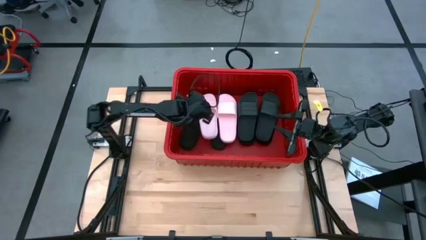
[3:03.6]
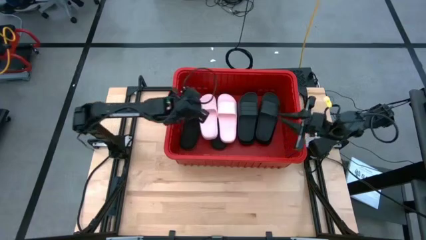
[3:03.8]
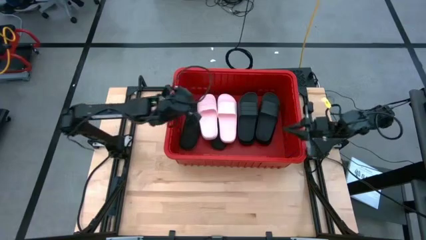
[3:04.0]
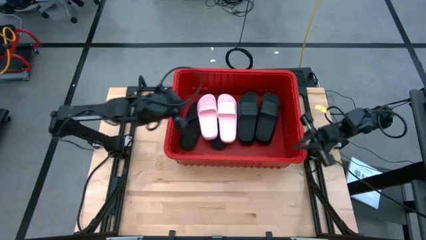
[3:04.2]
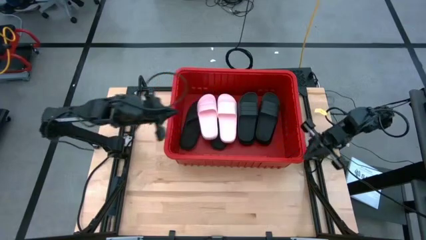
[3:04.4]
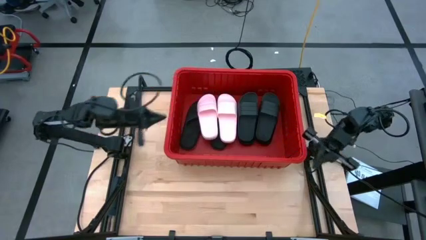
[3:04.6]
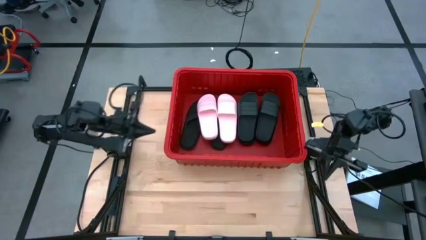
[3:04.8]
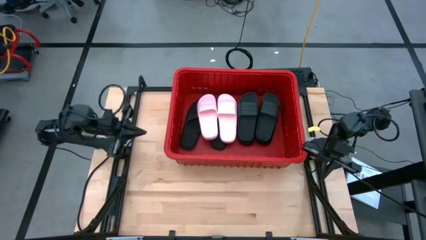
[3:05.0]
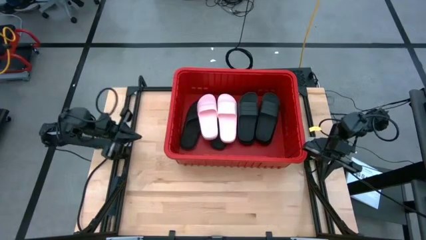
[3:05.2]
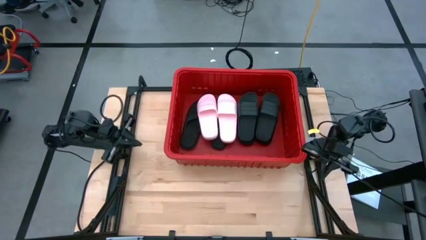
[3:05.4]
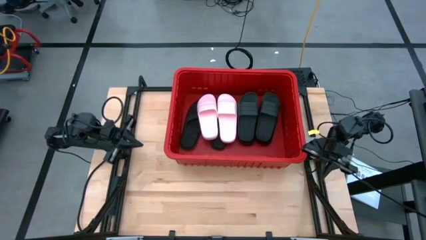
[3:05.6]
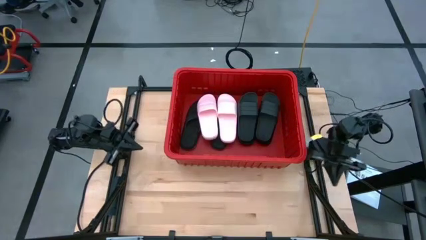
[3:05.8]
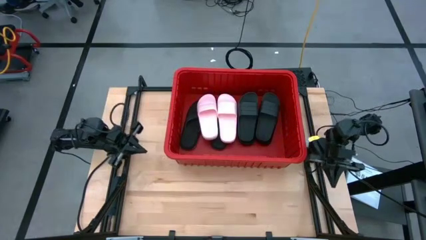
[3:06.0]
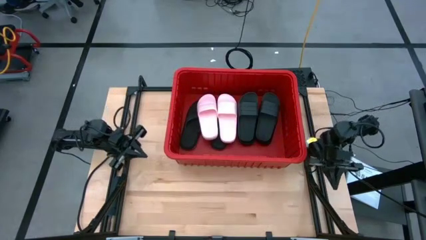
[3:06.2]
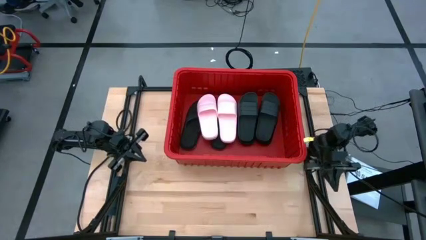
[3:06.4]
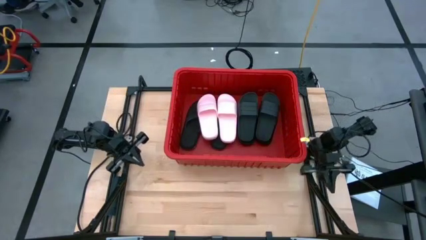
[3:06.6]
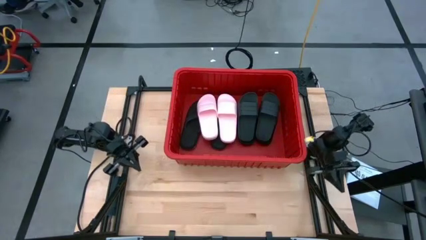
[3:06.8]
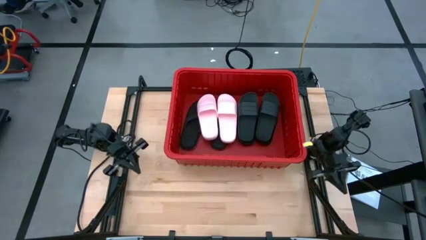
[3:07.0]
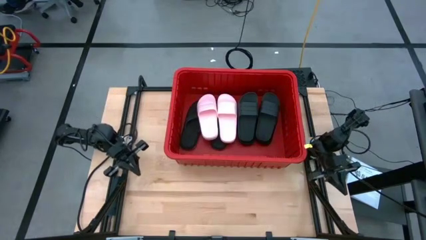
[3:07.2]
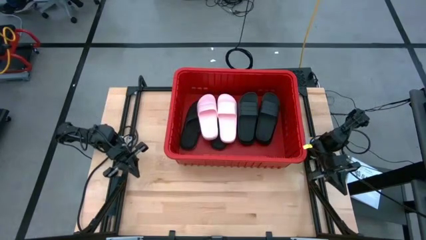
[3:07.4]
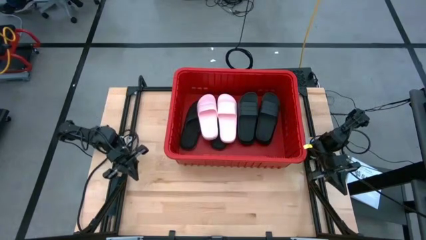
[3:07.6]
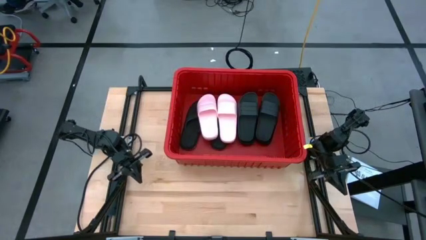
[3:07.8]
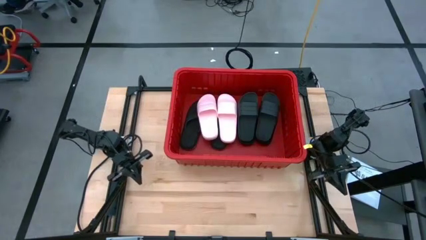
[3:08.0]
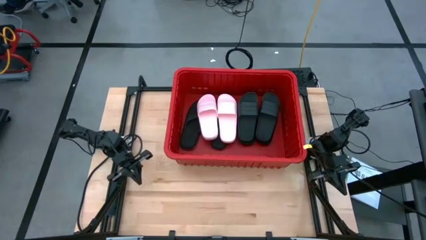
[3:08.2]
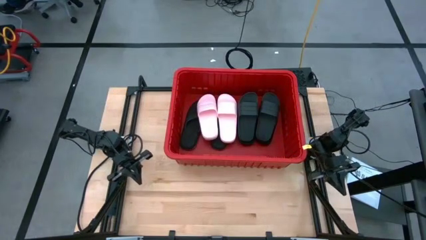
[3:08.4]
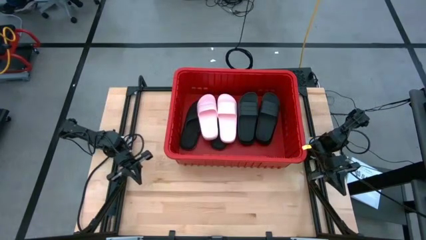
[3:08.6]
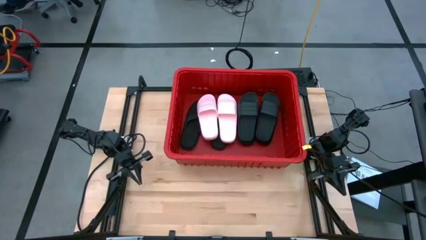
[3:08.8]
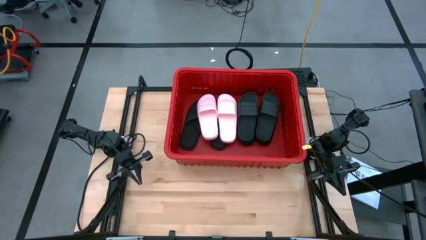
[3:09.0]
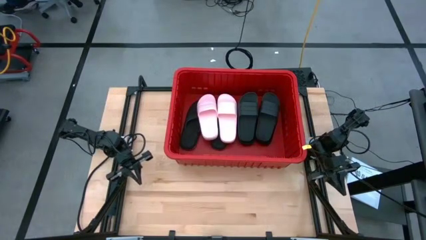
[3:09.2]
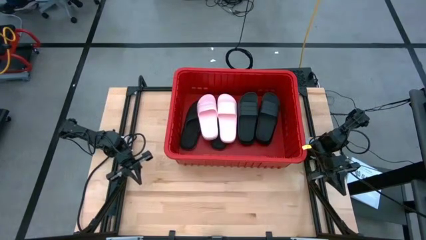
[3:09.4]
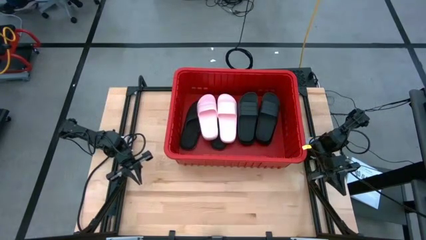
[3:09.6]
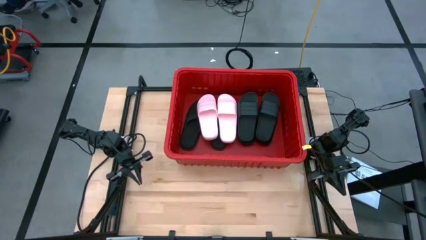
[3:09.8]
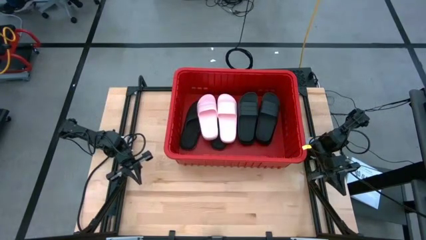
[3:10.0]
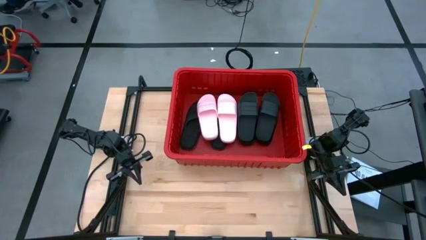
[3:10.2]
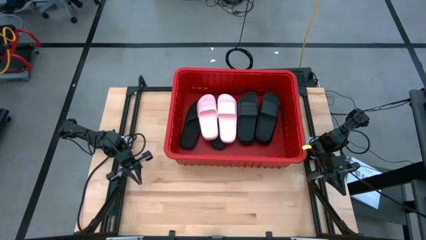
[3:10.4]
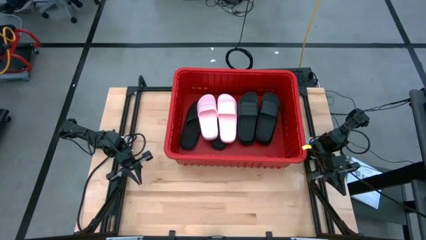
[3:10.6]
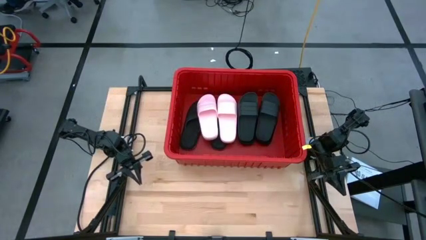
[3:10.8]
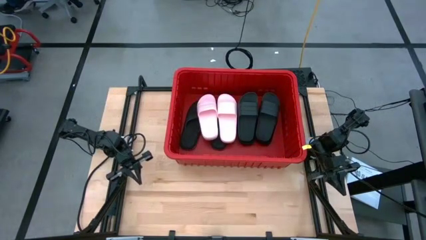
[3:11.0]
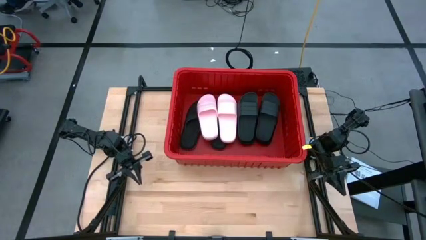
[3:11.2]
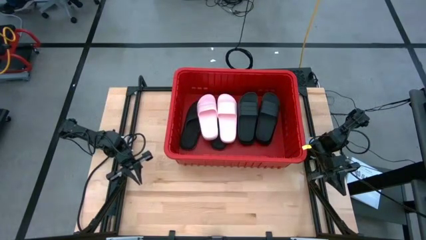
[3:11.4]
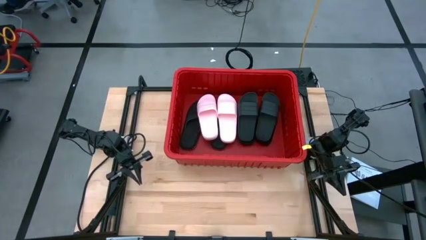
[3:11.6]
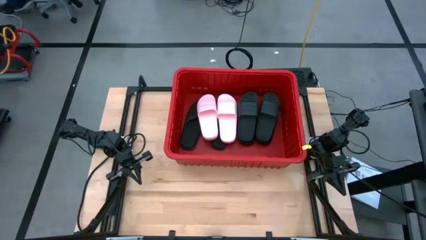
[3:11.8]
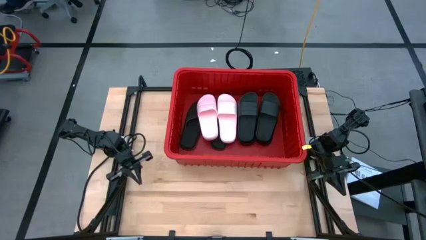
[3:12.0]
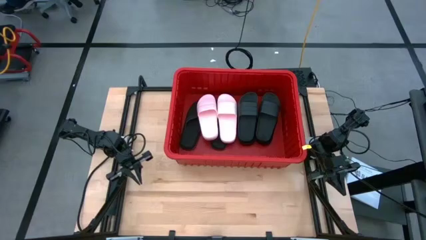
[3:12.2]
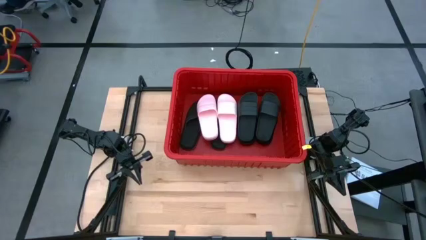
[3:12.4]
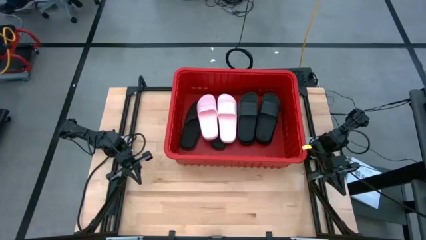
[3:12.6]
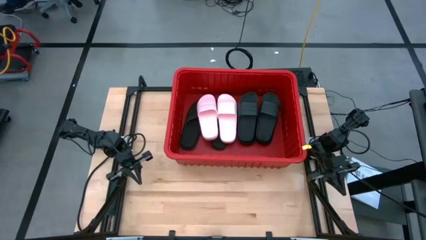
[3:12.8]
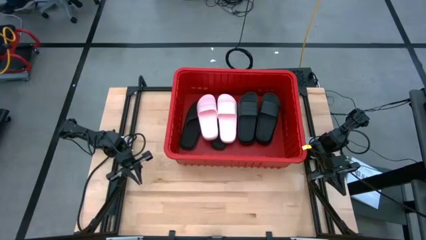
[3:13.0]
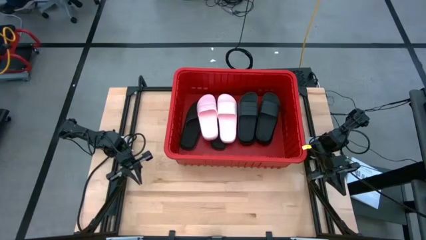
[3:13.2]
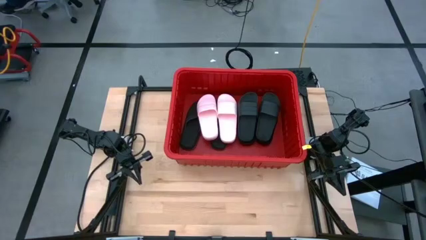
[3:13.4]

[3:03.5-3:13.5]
Task: Pick and place slides into bin
Return to Home Position

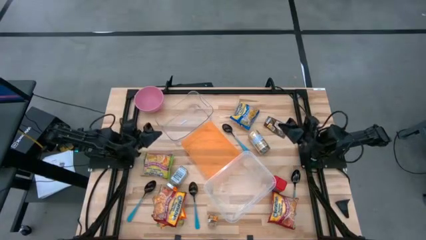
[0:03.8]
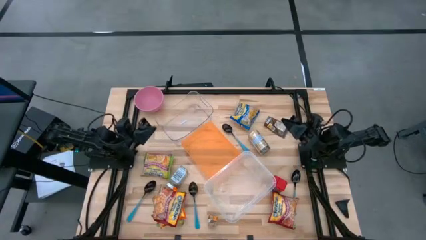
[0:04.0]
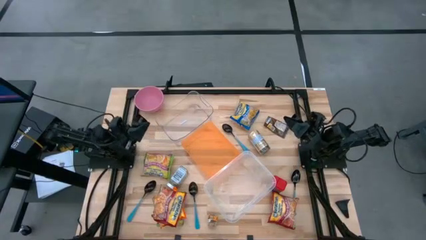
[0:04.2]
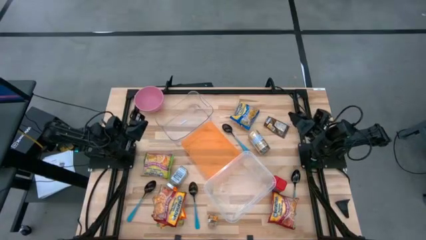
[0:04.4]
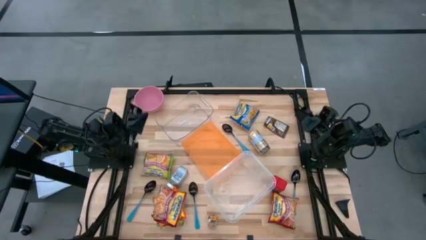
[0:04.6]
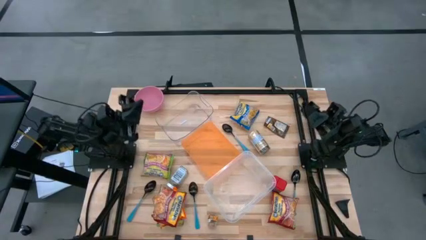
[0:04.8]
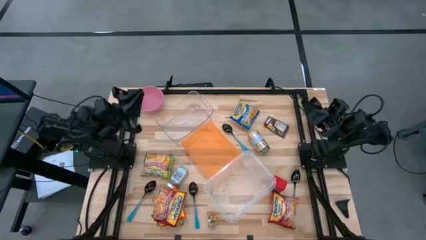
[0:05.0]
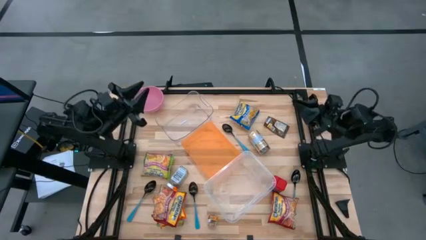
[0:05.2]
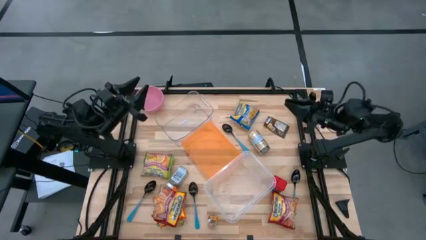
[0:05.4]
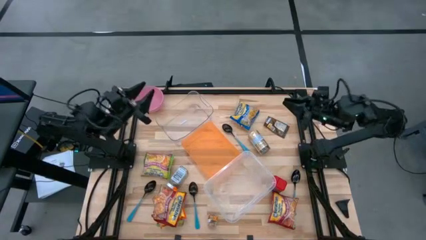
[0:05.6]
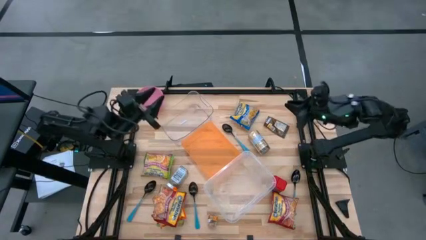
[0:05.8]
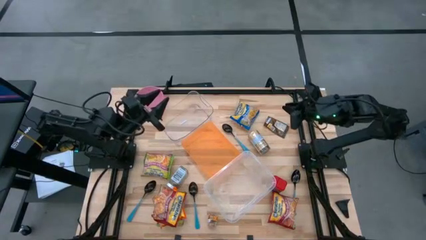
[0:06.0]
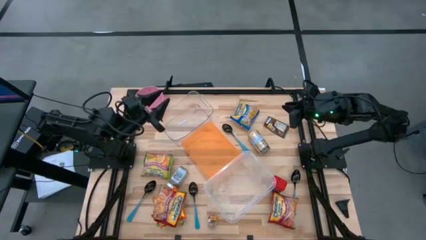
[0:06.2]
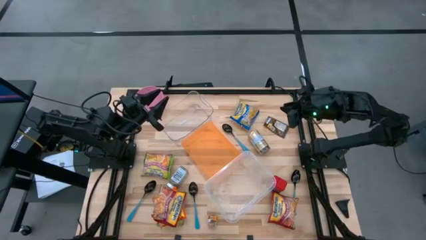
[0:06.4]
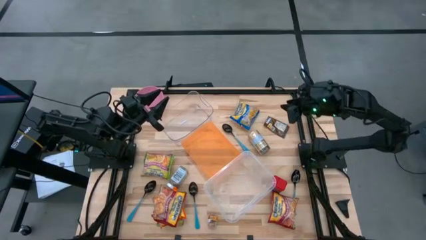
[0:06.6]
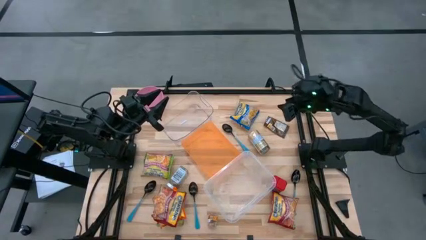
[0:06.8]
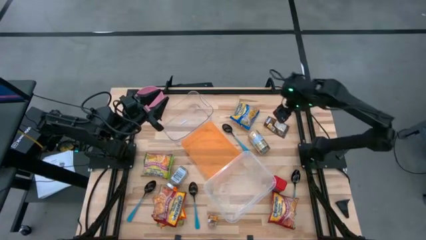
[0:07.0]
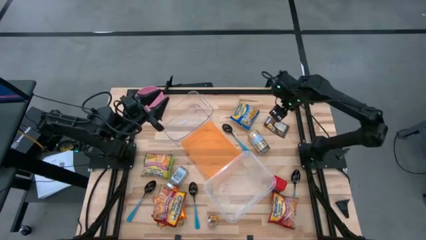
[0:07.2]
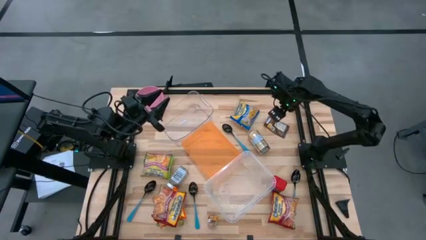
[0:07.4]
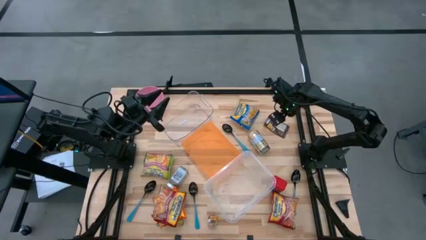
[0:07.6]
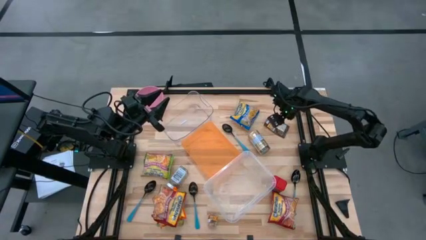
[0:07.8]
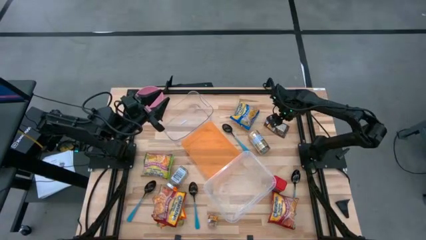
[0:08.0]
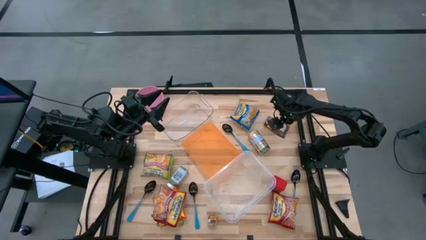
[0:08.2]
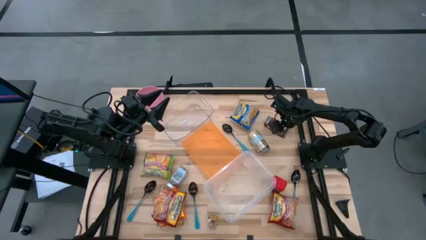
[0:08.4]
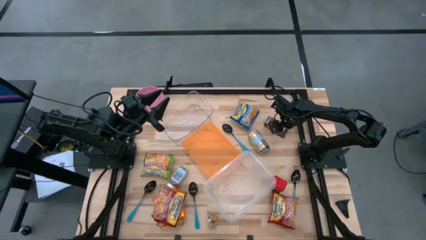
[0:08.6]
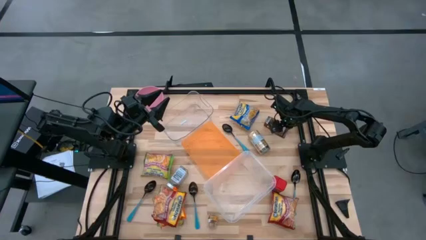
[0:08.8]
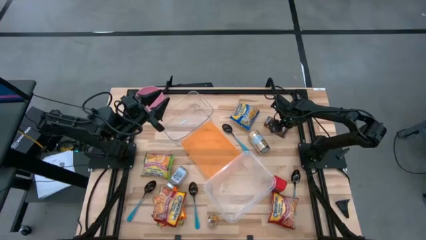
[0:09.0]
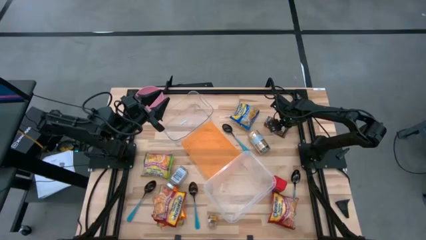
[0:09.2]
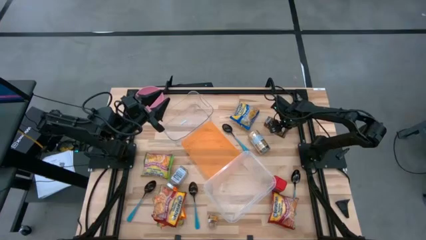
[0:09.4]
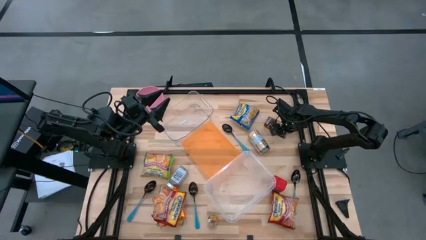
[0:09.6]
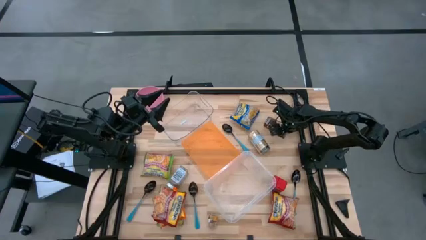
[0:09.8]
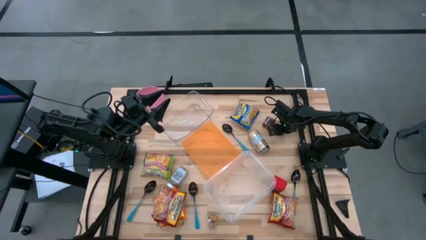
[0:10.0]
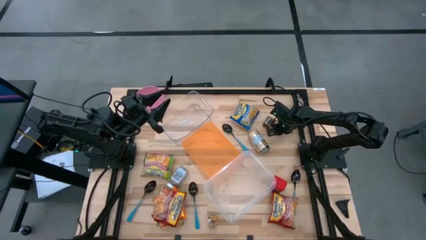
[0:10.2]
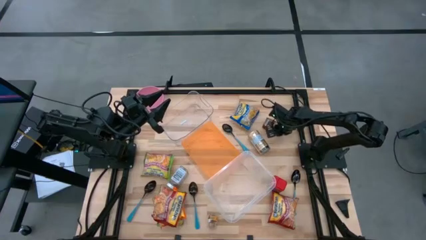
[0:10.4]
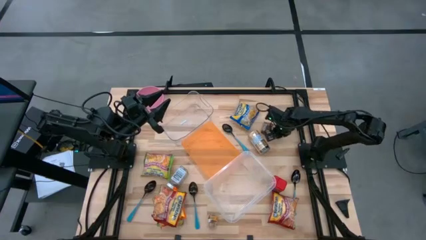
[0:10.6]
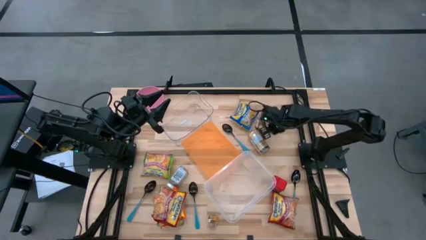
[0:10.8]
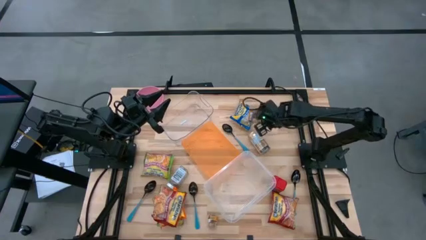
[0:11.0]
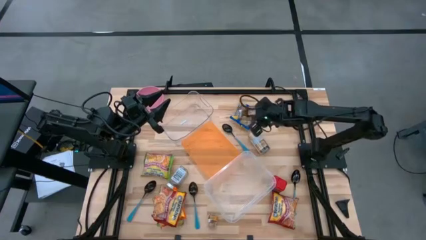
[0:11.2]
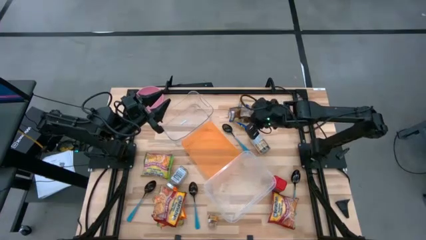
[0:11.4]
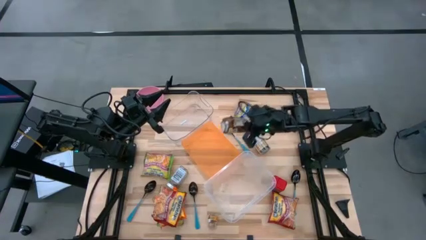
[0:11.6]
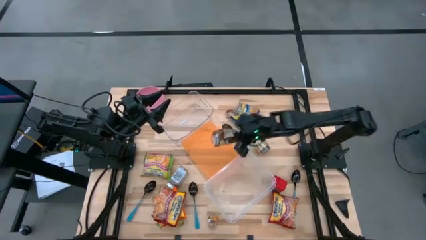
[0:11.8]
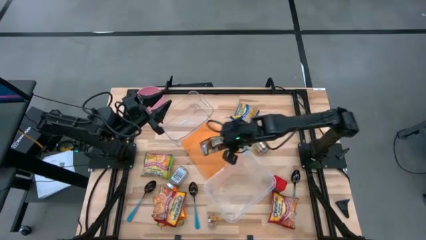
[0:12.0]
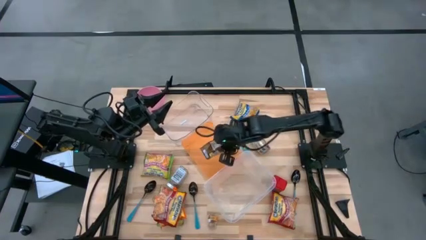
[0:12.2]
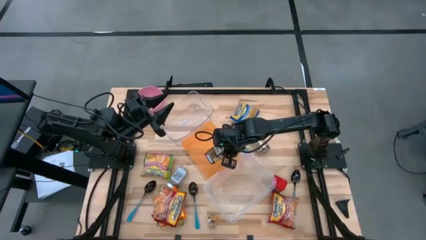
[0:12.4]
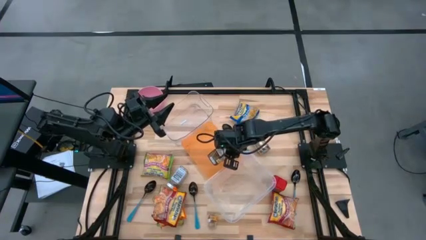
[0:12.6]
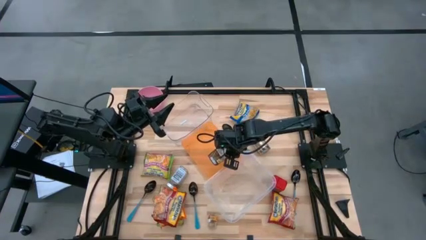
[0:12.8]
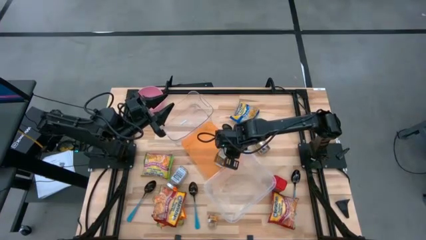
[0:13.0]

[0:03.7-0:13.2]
Task: Pick & Place Food Item
Put the orange seasoning pack into the orange bin
